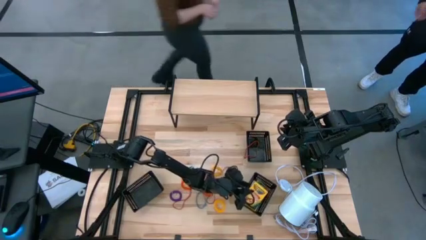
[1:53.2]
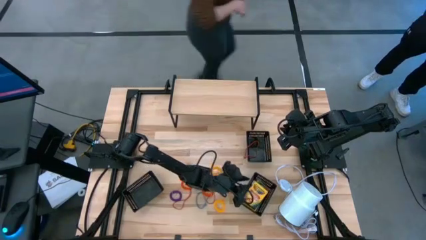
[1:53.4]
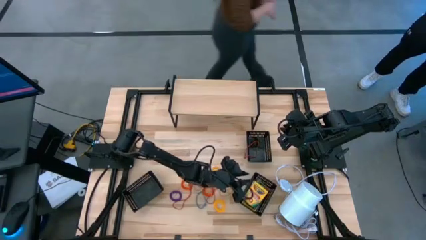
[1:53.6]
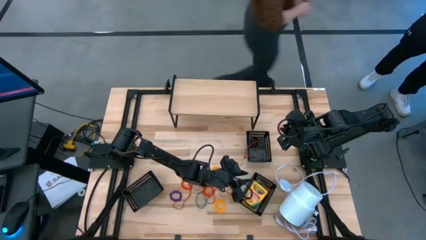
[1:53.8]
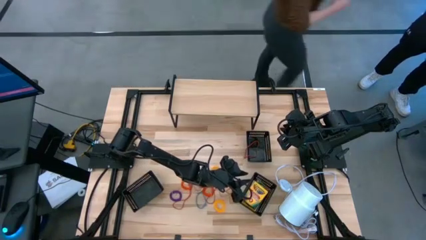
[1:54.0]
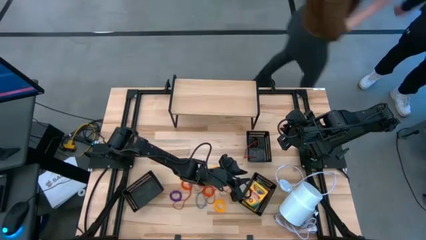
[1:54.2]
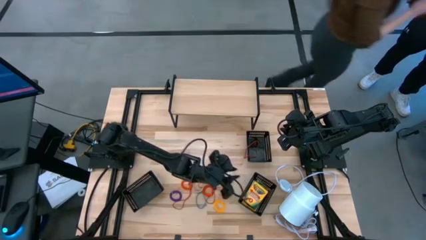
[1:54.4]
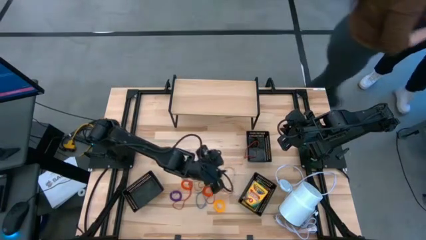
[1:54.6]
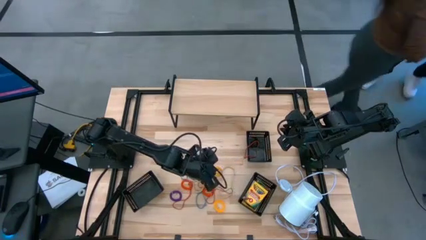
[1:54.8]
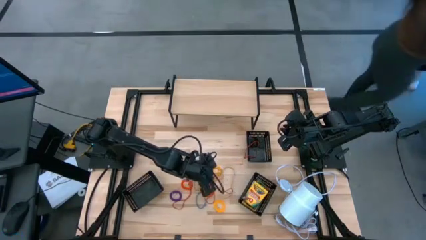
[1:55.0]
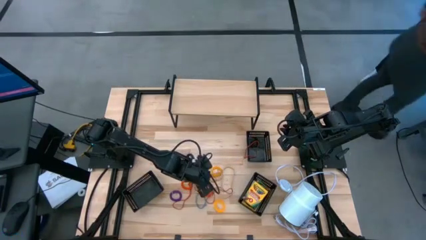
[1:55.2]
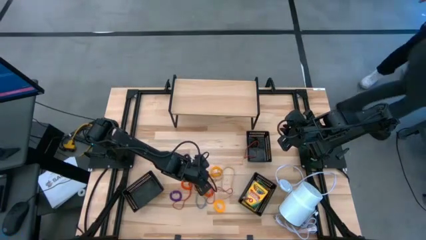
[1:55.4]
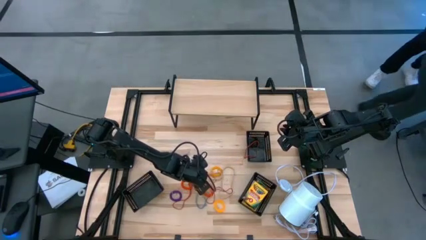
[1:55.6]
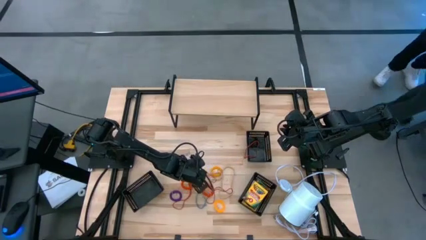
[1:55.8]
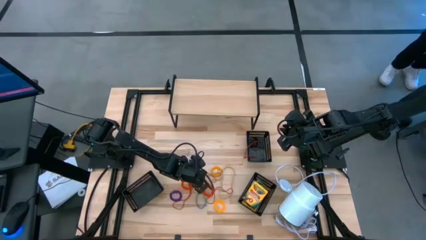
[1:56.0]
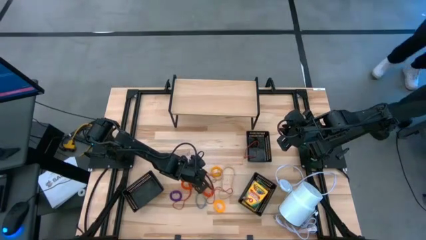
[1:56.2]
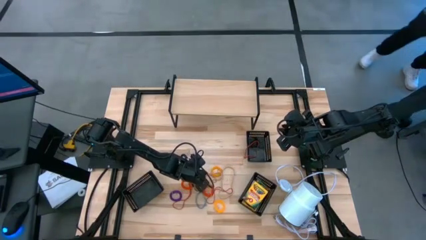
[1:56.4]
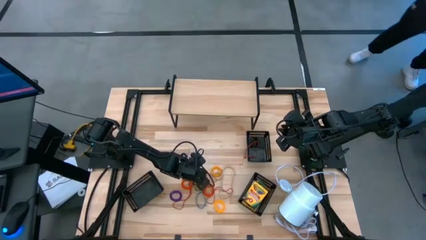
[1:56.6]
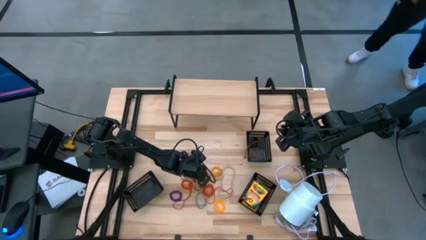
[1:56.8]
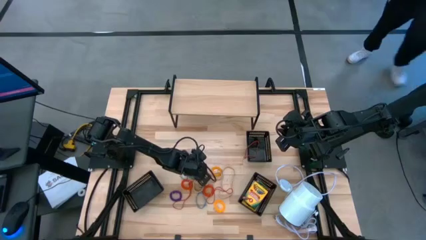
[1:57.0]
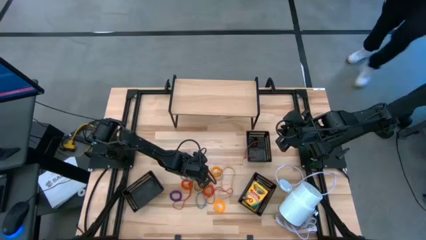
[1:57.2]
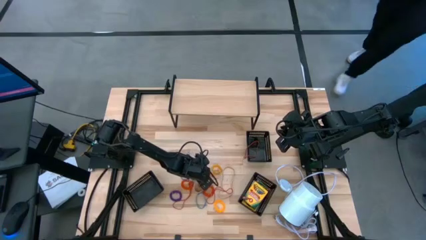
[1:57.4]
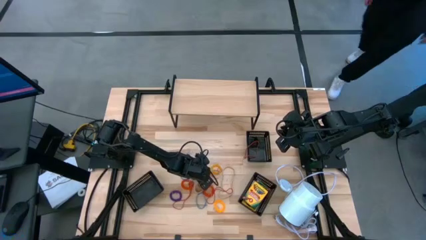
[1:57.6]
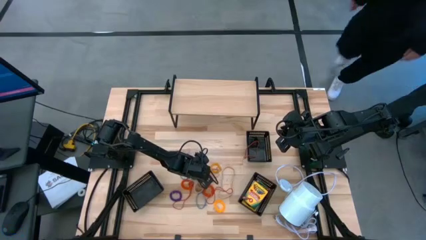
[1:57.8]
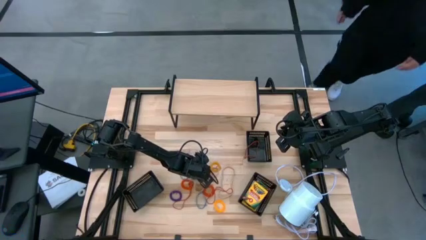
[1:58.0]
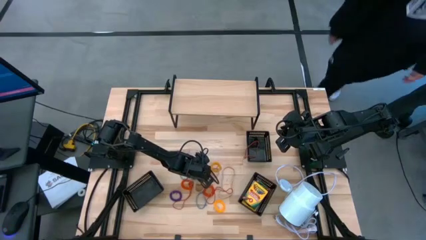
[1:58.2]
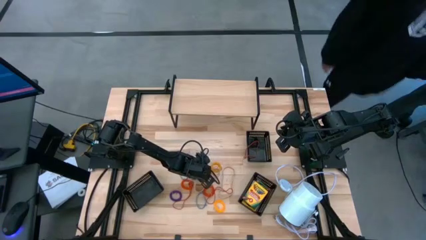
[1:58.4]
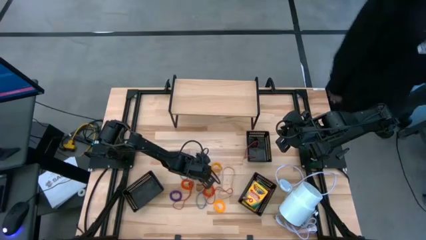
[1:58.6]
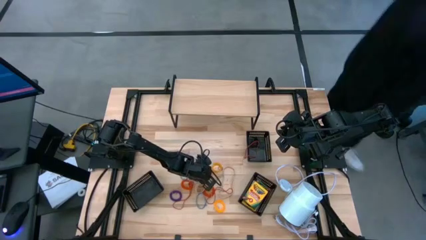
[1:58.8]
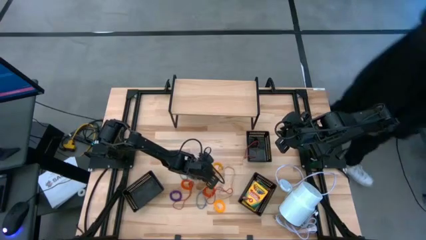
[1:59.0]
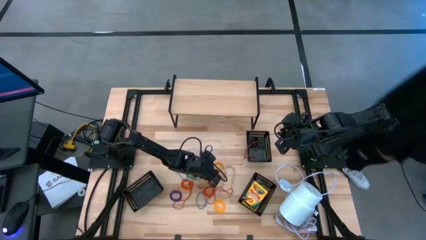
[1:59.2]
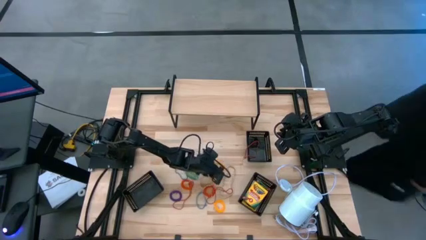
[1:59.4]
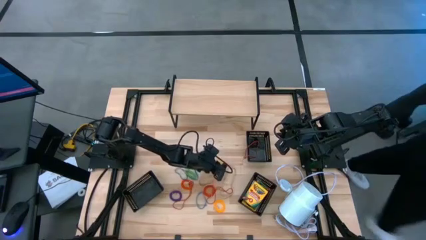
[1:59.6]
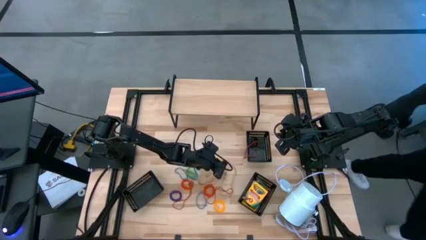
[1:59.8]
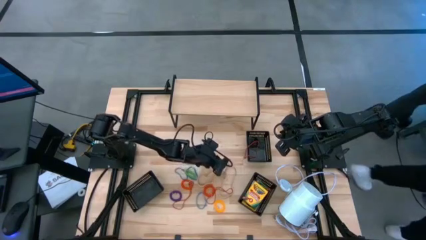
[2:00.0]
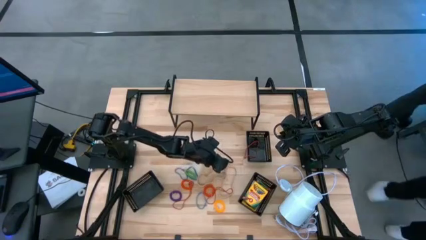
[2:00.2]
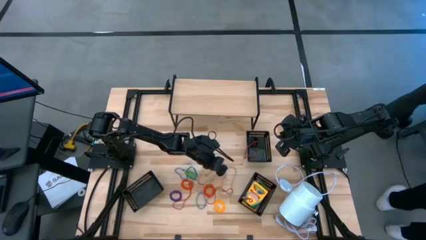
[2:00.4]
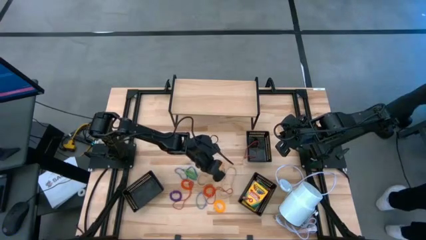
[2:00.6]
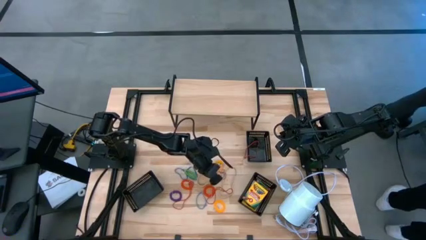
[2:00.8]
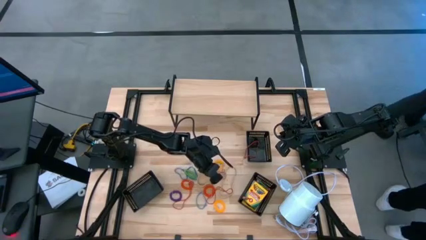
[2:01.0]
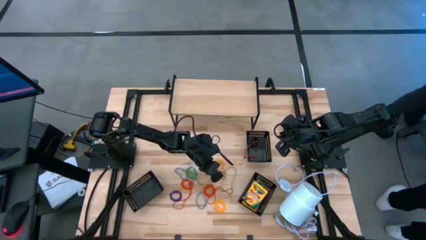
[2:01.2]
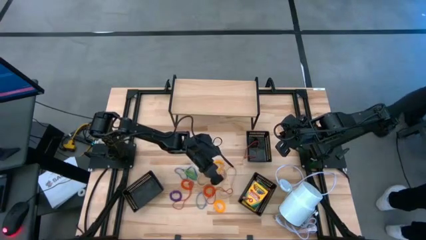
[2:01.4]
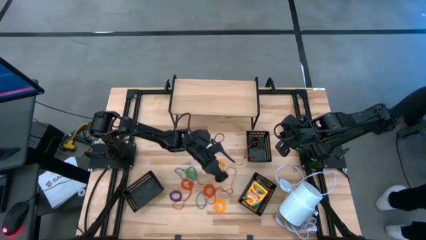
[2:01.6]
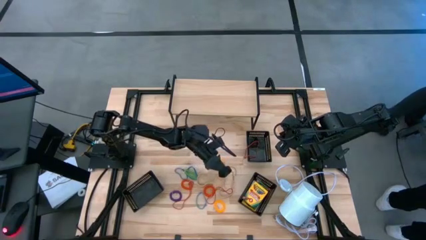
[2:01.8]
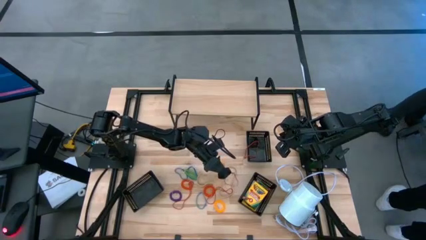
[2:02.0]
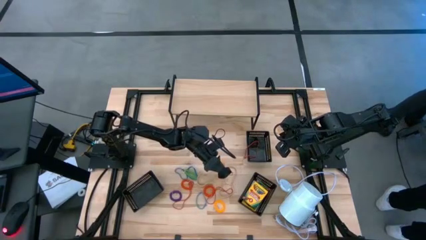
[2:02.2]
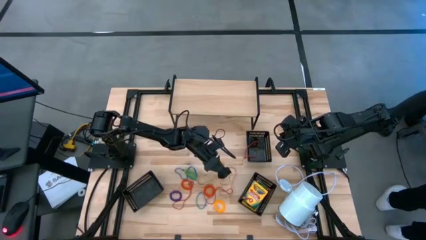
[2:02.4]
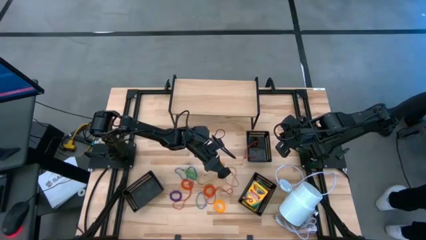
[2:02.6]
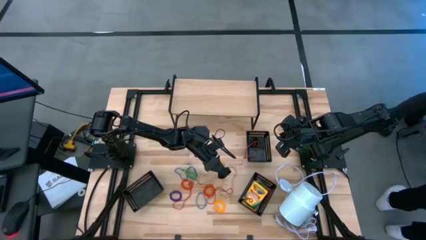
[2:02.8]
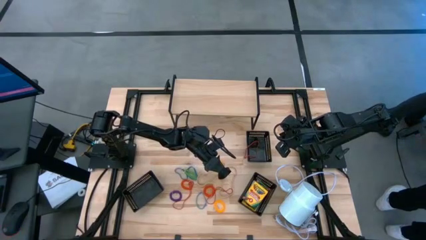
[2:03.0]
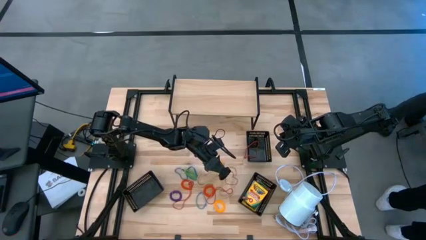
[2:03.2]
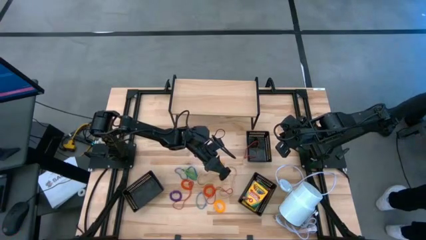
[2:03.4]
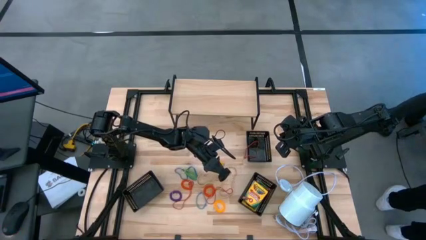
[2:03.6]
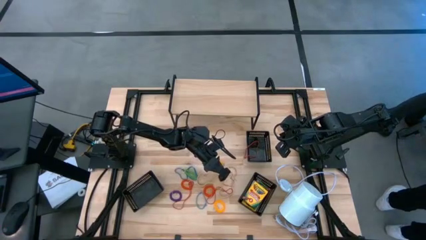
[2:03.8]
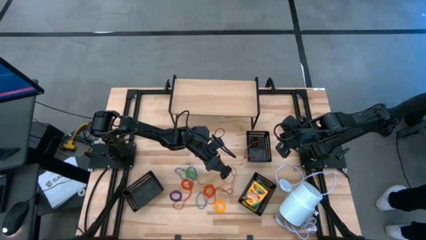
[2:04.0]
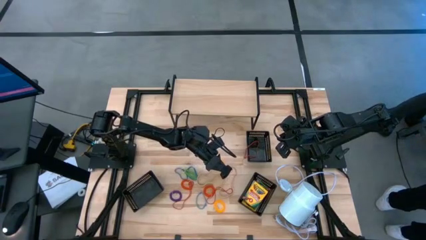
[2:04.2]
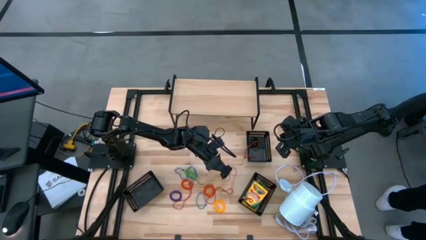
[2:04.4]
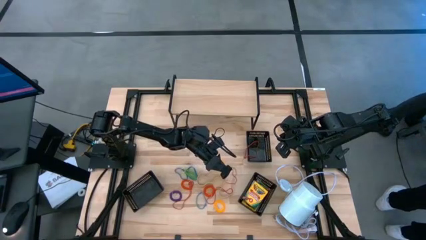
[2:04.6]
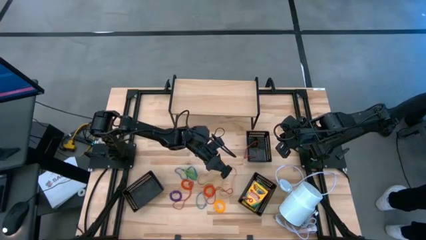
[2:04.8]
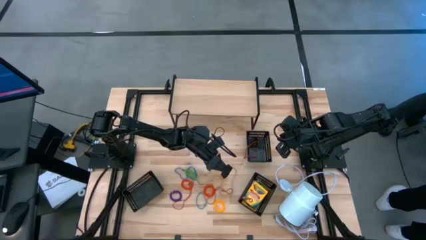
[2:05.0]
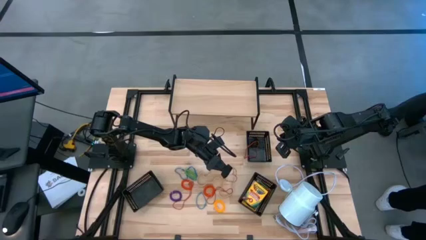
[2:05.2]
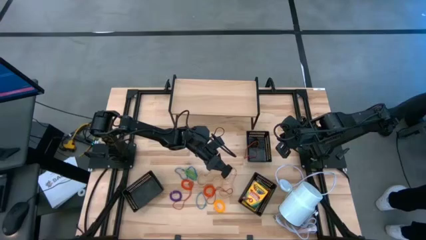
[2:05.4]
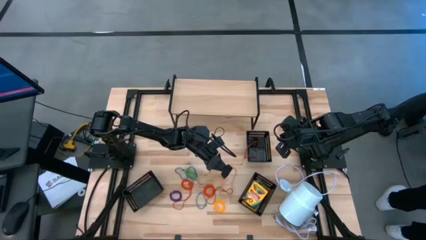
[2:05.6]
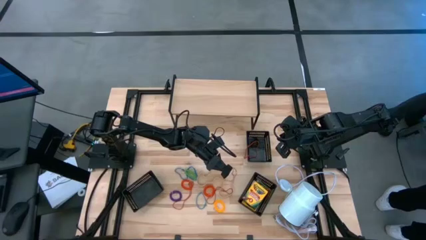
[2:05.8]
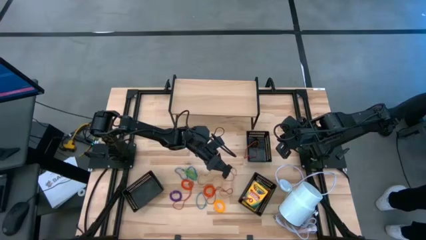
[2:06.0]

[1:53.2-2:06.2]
Task: Pick & Place Office Desk Supplies
Put the top red rubber band into the top right black bin

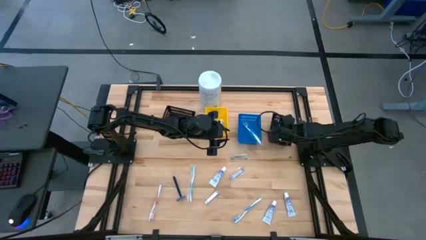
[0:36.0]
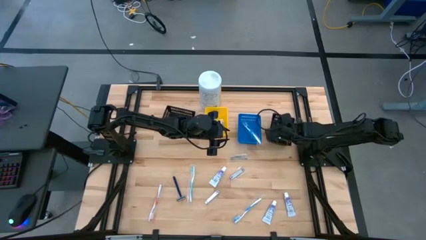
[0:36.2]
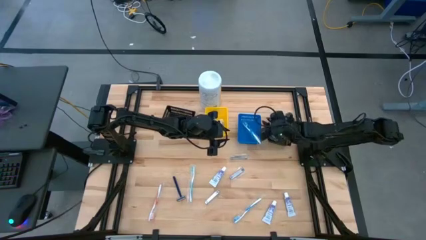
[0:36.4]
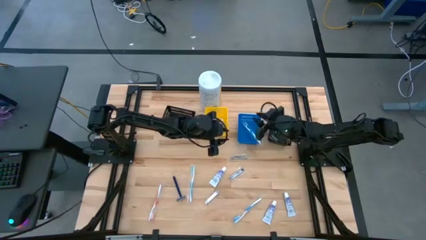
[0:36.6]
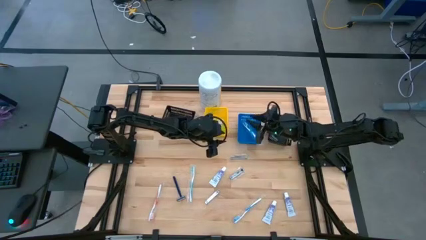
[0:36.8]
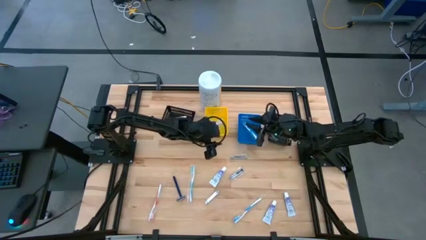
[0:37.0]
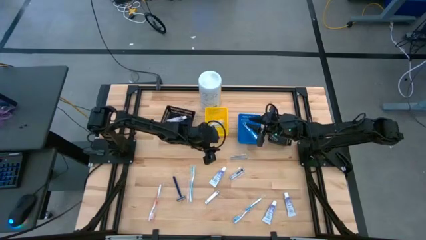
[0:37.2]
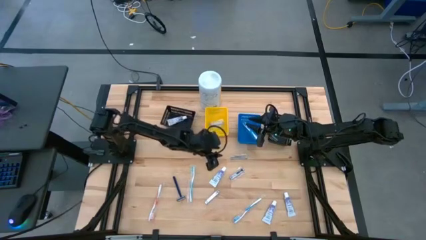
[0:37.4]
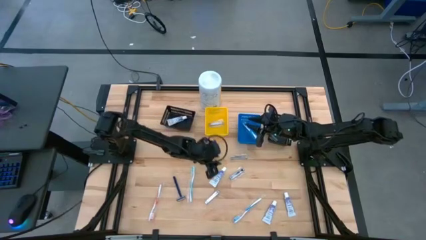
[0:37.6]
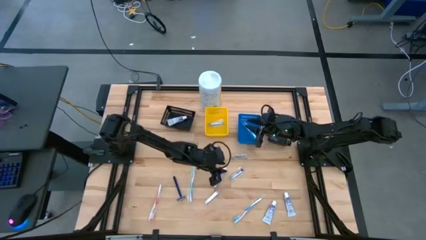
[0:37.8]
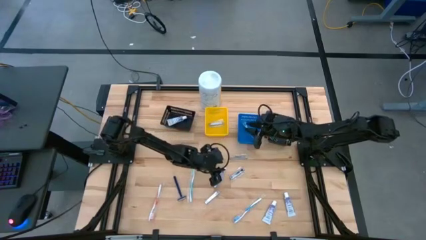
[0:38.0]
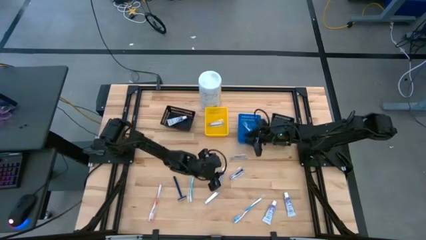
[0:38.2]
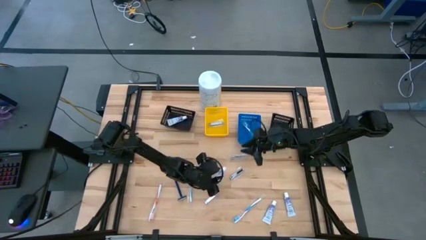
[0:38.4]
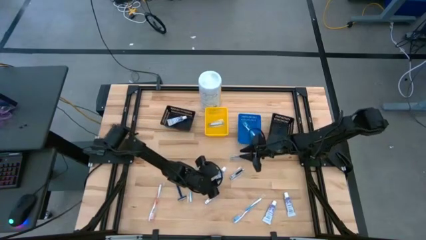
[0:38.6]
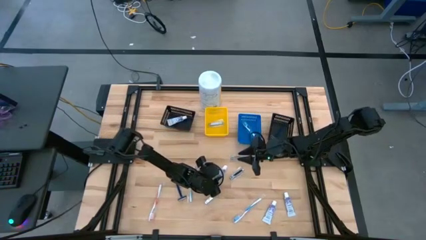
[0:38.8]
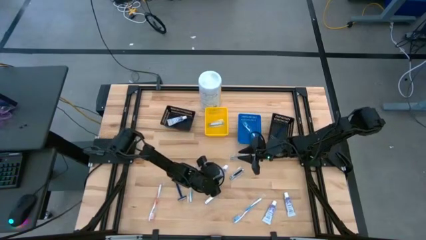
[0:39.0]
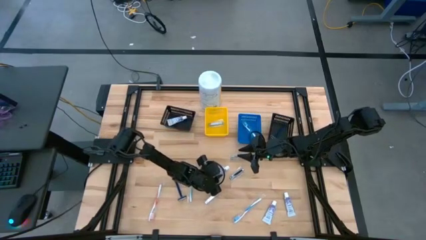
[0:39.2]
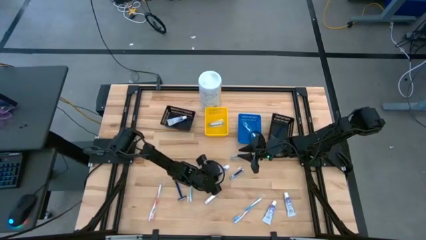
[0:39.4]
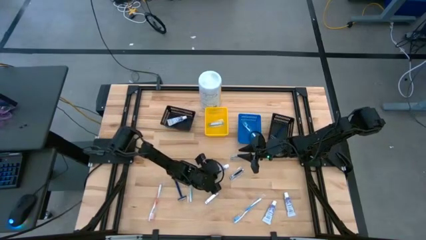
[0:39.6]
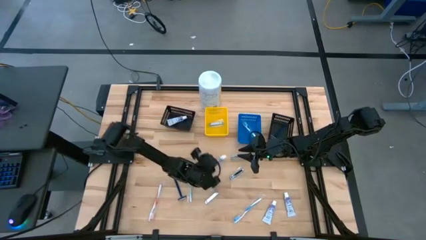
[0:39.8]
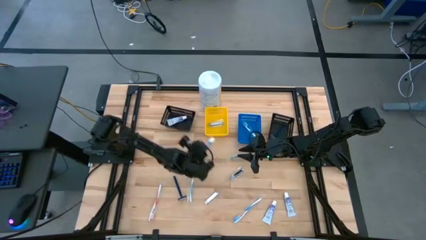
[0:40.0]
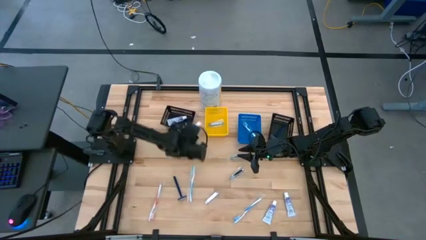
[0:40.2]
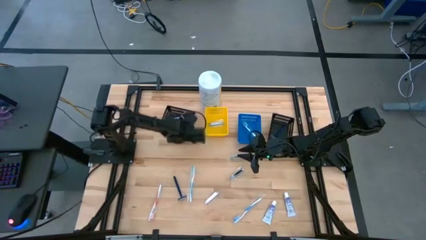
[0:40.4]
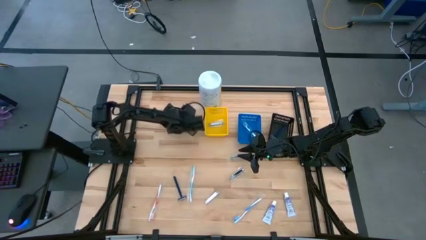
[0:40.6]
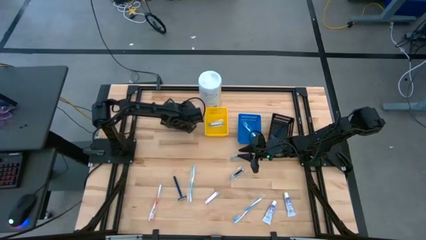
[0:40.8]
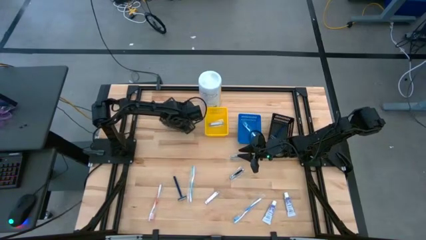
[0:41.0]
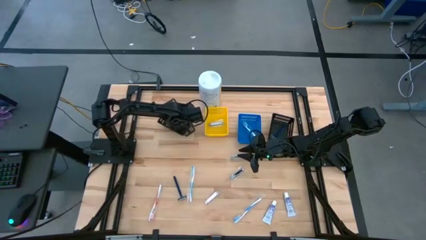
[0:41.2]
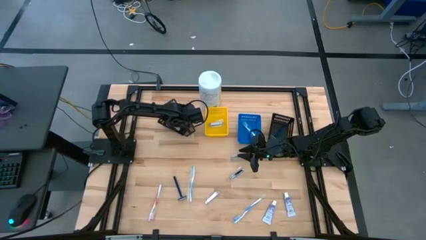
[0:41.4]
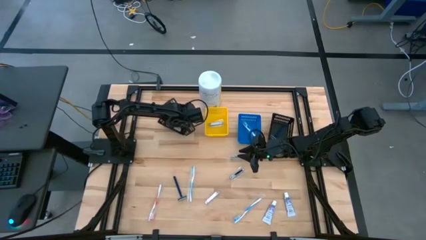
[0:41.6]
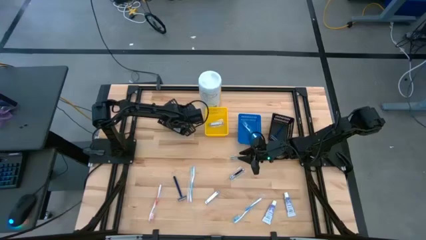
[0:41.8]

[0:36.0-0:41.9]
Task: Pick & Place Travel size toiletries
Put the white toothpaste into the left black bin
